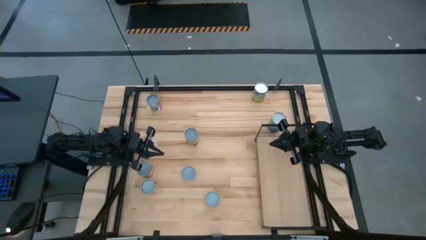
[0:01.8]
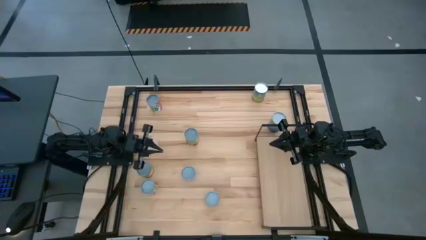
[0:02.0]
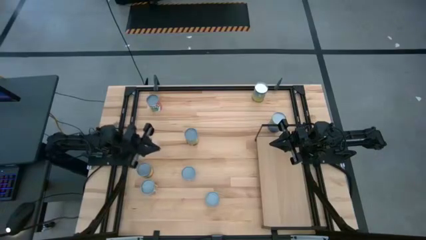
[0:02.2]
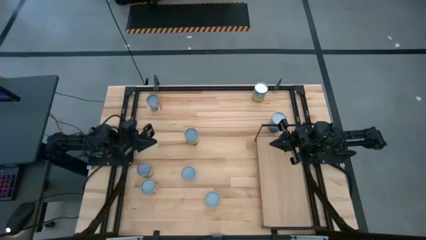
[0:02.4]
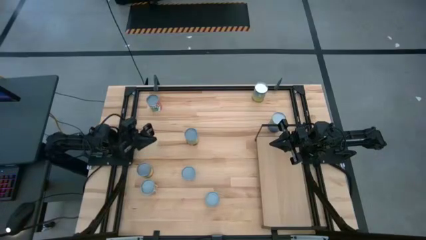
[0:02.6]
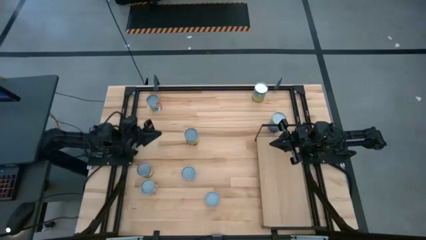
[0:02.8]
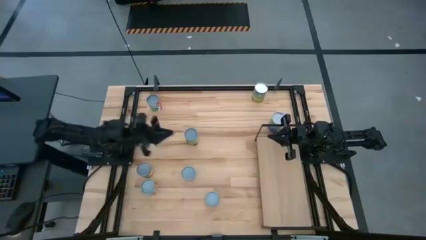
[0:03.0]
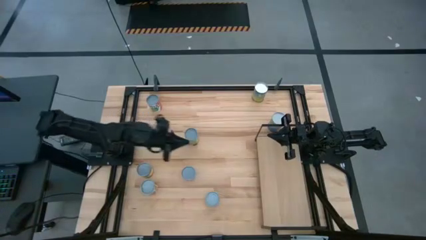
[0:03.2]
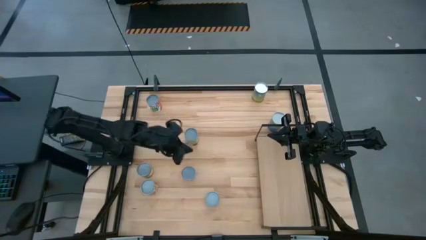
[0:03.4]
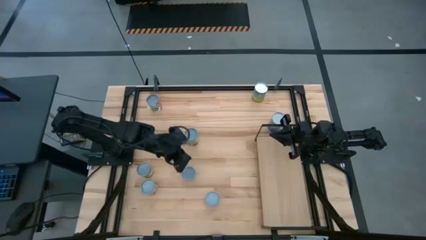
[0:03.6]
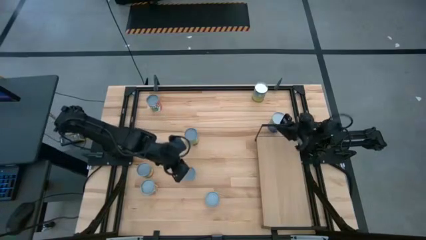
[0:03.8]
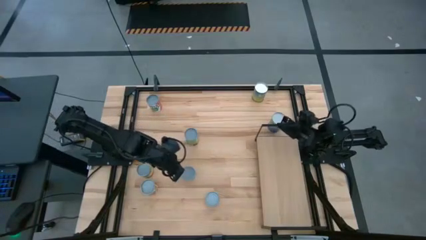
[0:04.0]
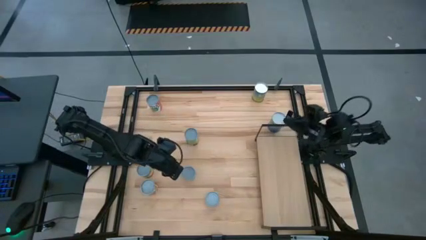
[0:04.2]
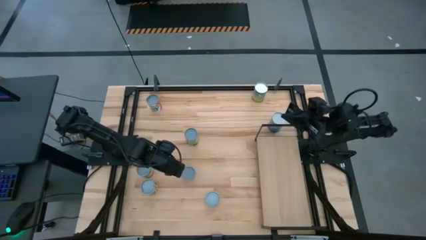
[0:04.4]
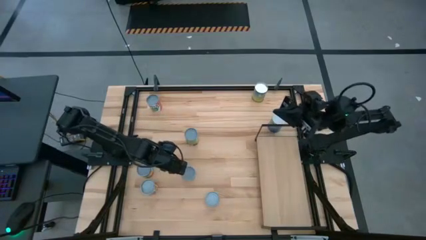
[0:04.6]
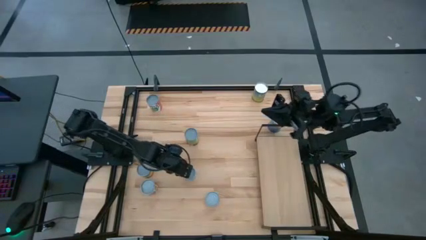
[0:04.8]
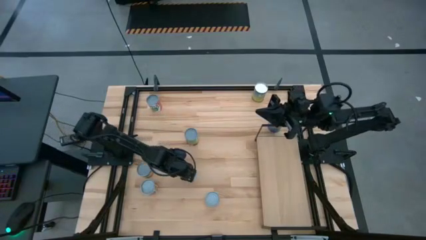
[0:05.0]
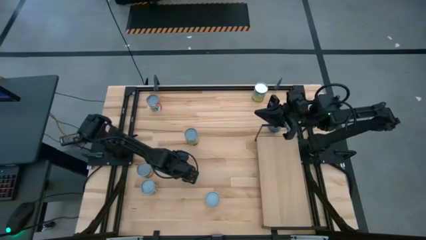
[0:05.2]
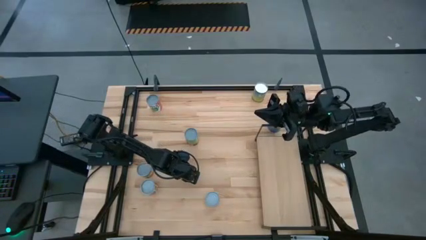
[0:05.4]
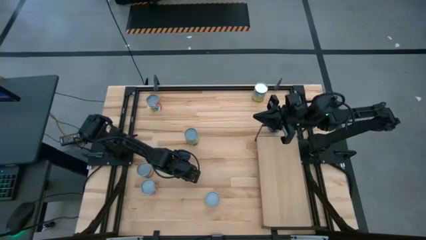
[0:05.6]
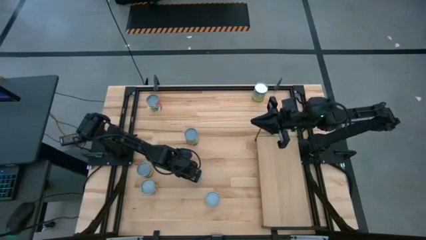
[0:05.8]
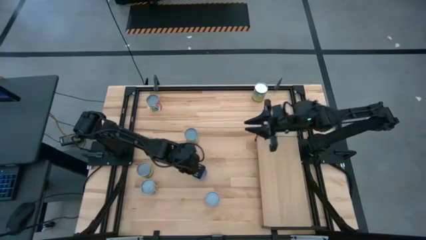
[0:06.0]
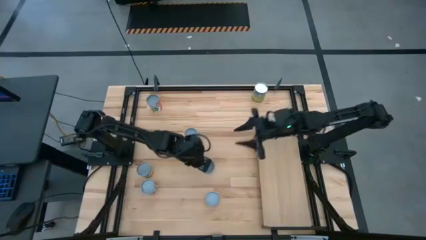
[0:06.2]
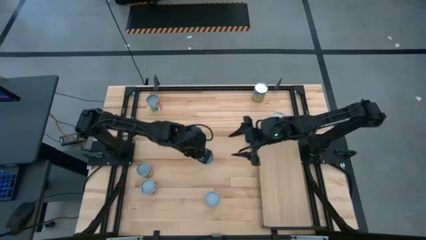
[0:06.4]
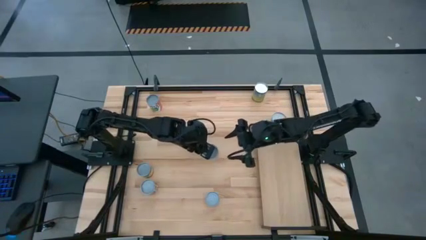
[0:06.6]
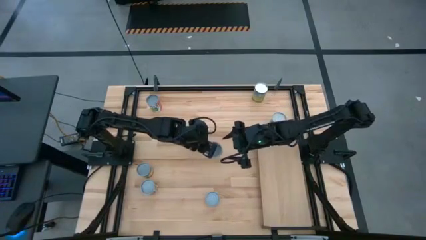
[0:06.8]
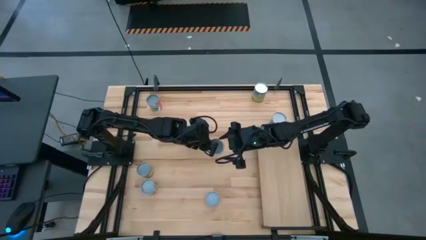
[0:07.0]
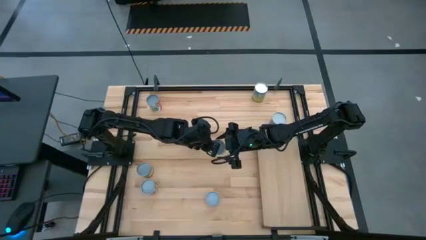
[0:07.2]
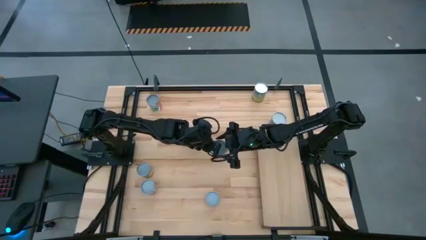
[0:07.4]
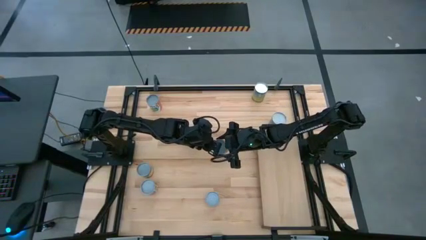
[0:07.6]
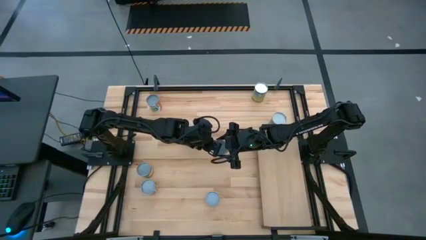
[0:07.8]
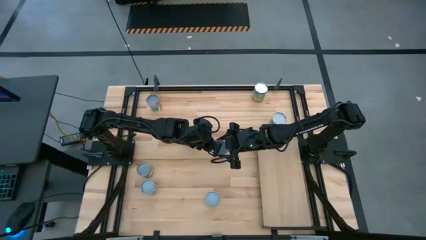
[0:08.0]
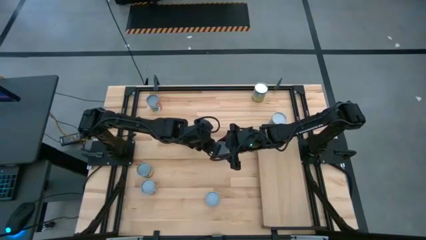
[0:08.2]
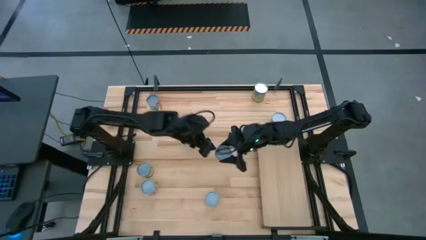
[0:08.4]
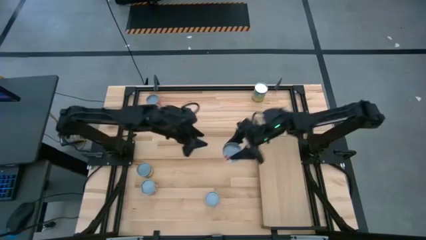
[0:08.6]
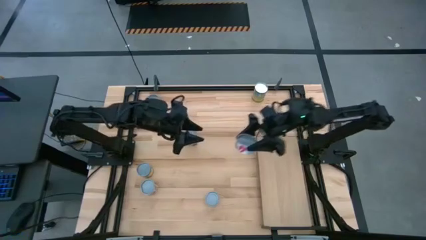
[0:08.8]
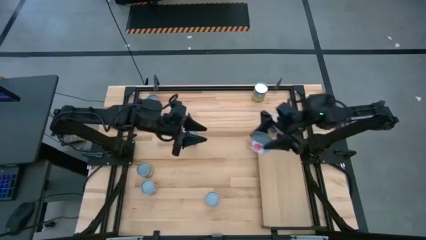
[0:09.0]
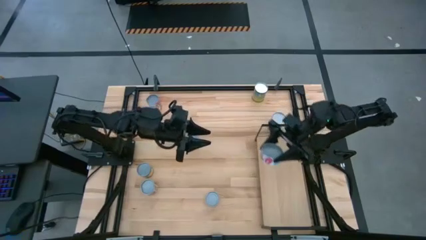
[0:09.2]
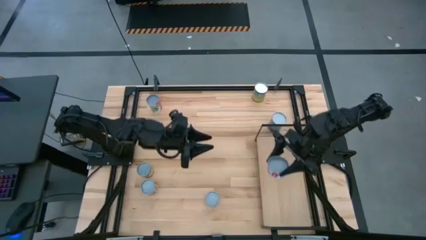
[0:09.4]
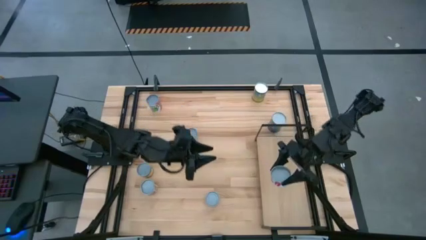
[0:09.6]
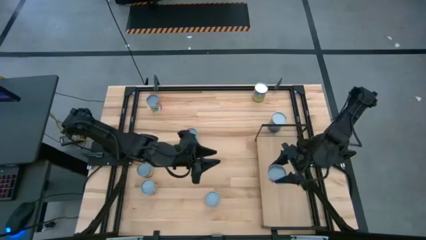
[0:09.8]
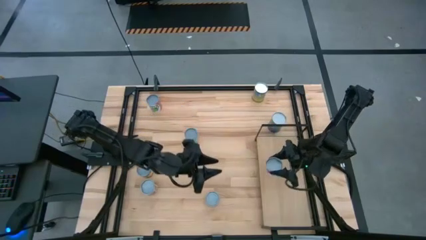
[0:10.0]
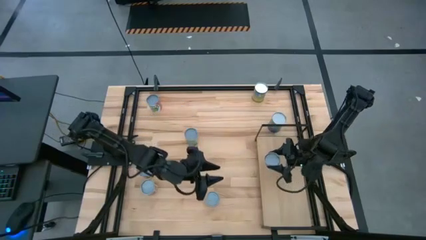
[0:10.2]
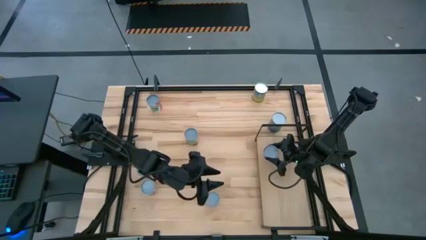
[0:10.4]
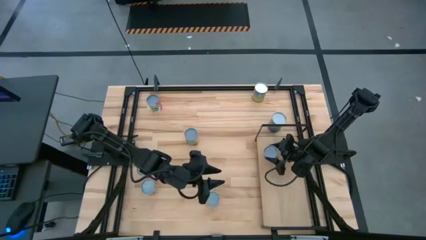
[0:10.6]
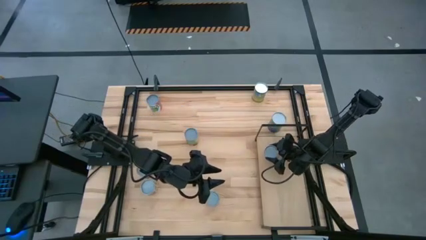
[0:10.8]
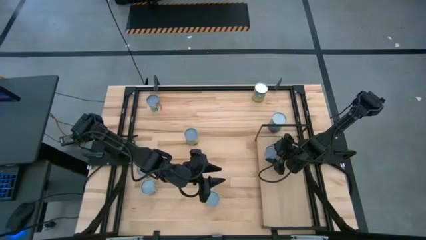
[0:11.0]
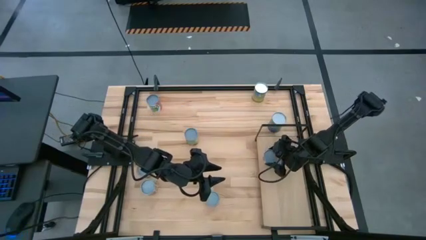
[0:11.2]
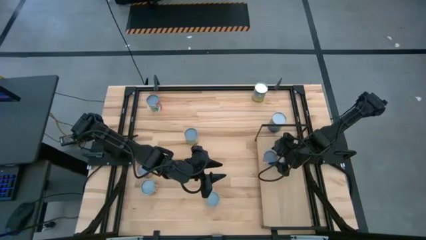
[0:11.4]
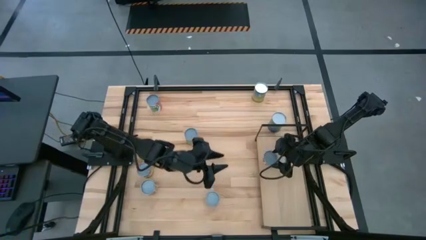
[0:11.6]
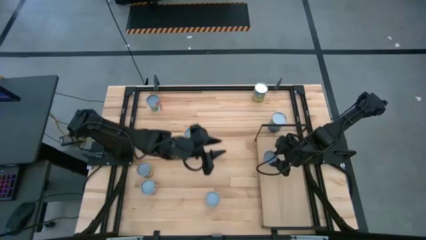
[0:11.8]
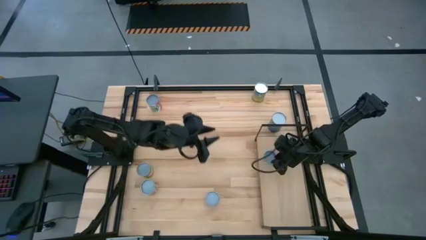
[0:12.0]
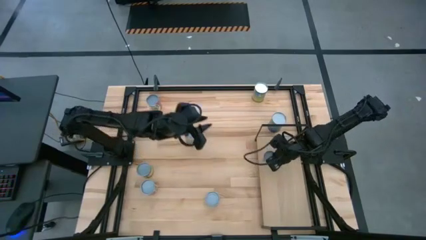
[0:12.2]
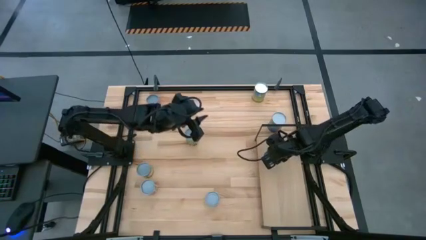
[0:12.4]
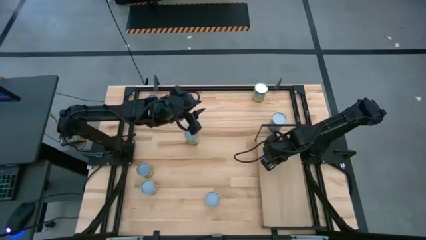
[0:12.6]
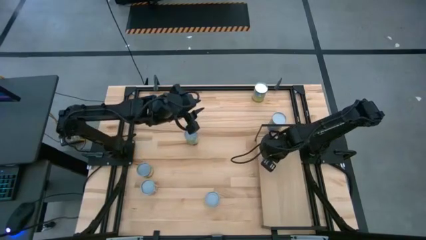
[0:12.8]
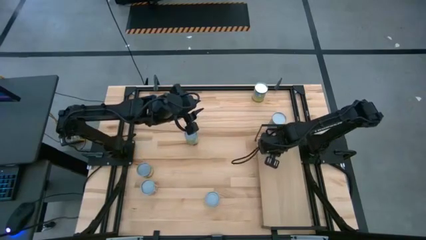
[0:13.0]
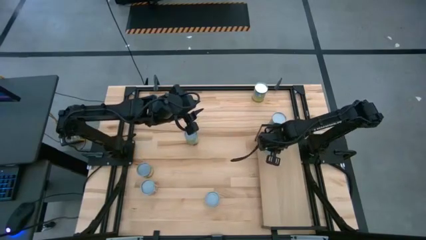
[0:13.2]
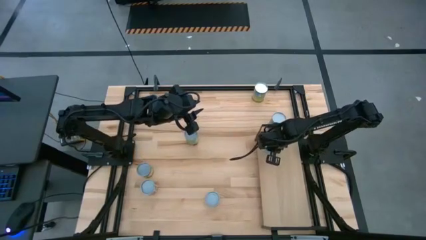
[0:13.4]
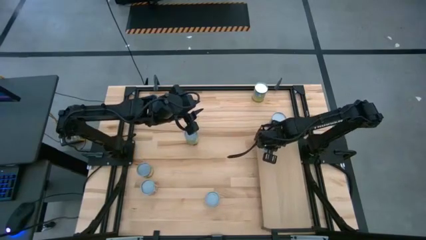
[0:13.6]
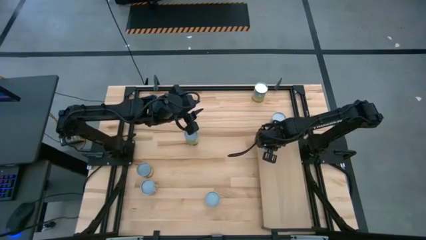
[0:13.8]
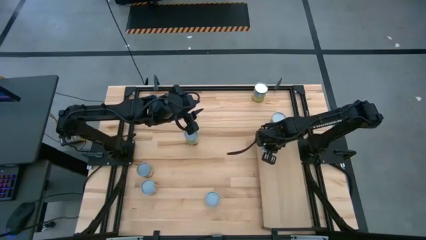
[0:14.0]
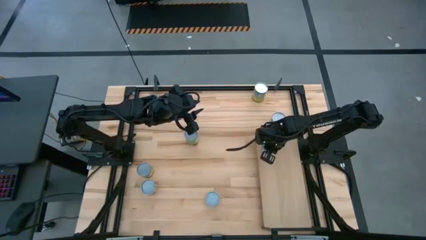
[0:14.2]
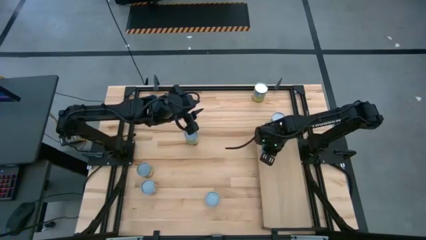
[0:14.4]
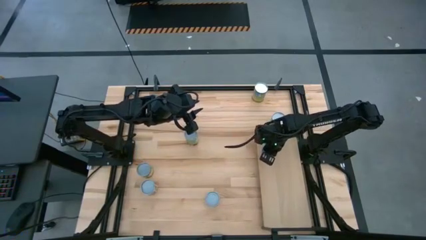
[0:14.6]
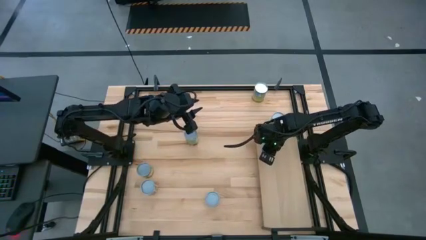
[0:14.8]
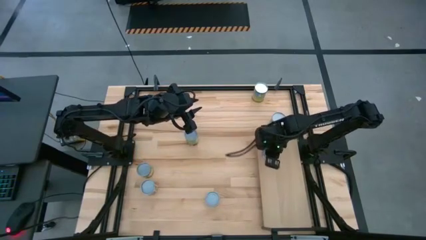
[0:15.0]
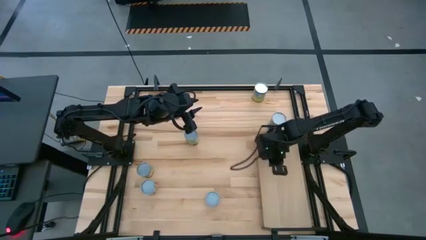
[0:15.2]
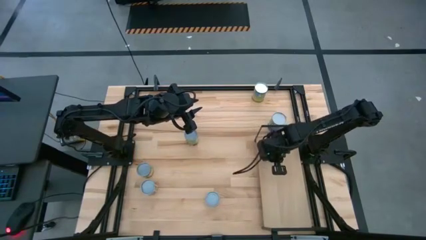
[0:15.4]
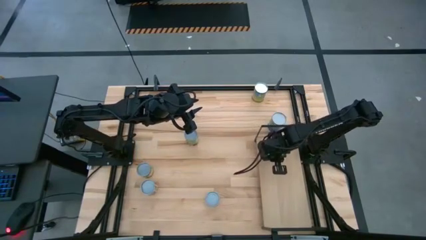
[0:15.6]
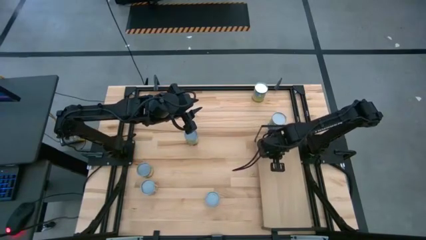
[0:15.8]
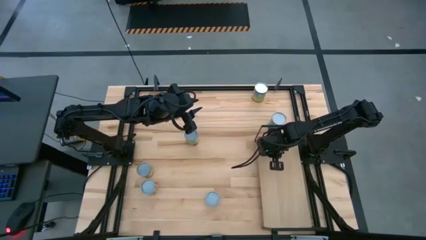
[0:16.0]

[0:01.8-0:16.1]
Task: Pick and place cans onto a shelf
Put the canned salmon on the shelf
